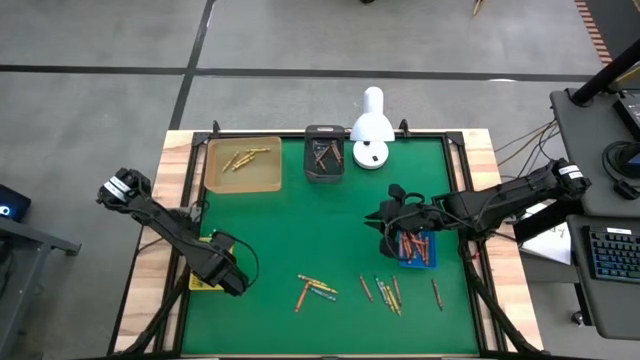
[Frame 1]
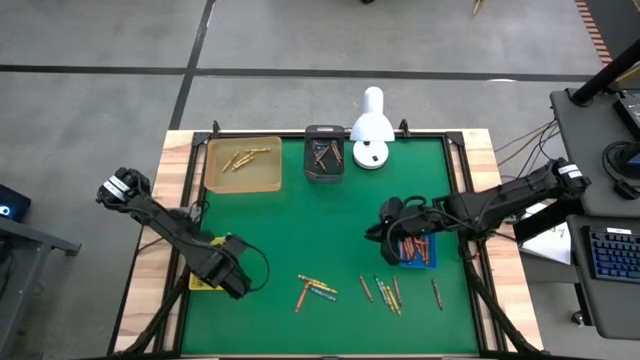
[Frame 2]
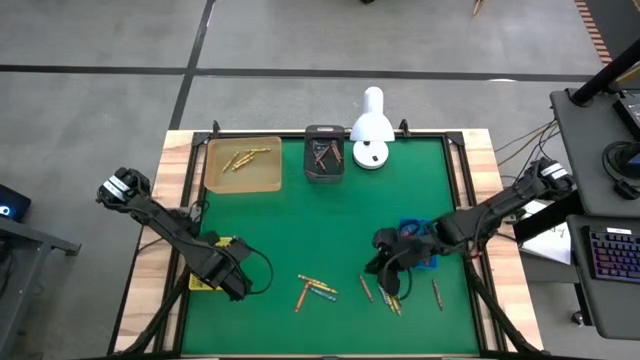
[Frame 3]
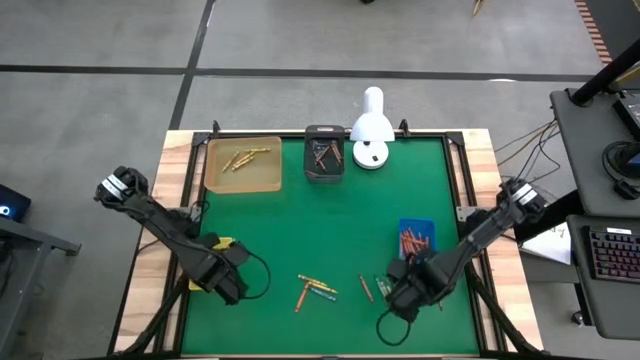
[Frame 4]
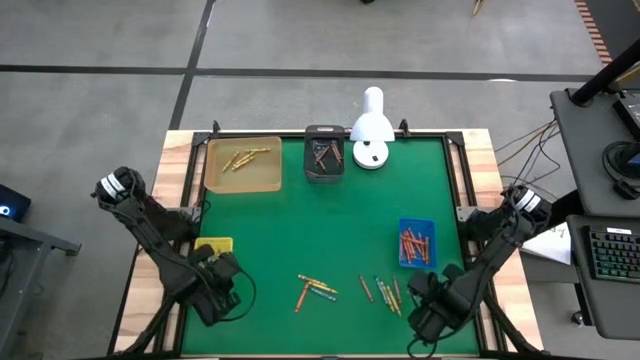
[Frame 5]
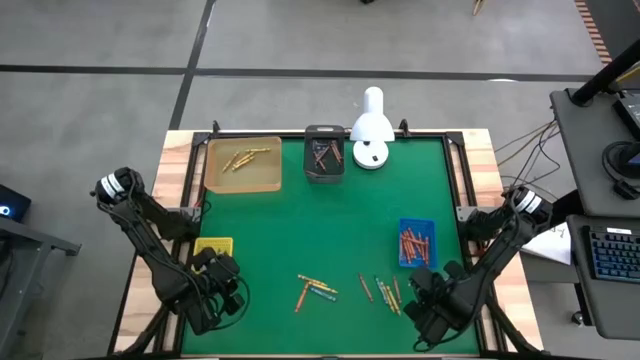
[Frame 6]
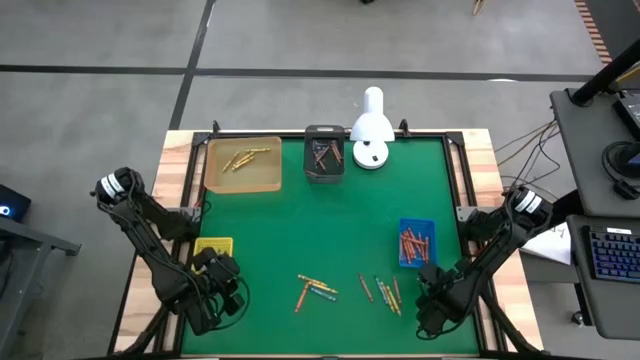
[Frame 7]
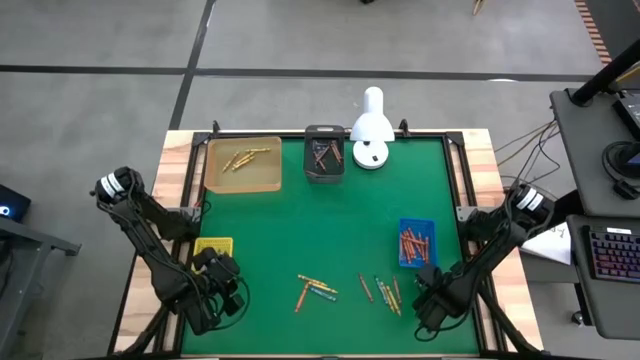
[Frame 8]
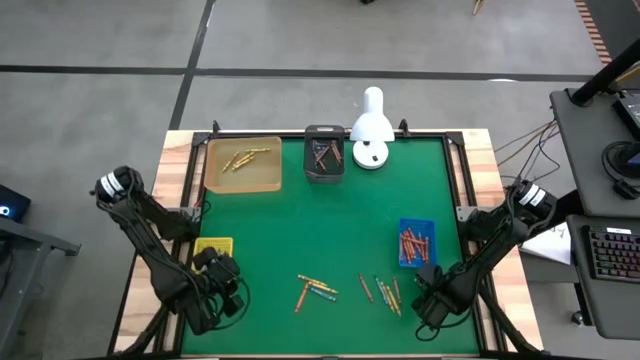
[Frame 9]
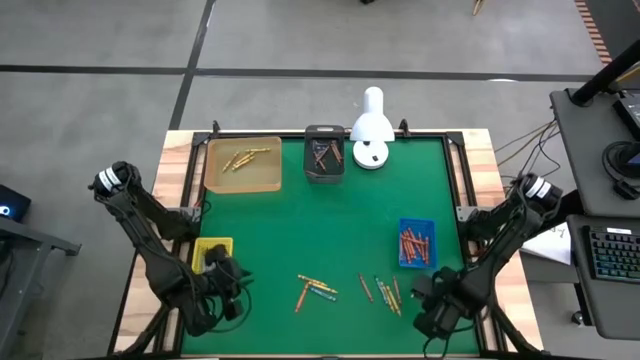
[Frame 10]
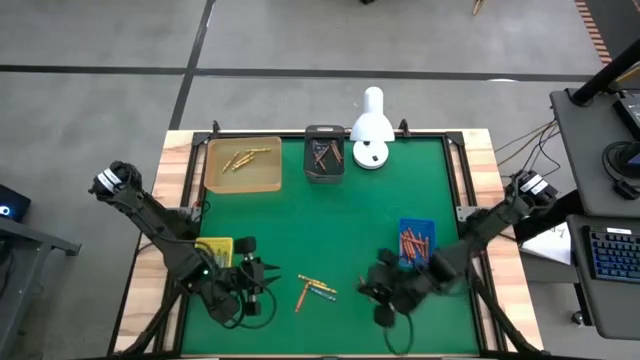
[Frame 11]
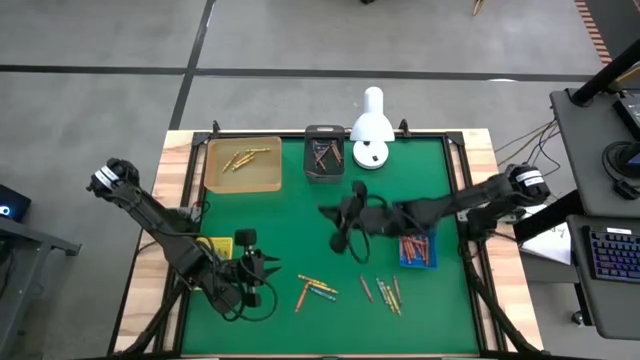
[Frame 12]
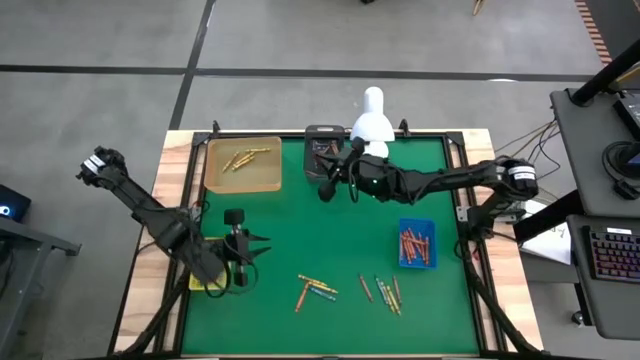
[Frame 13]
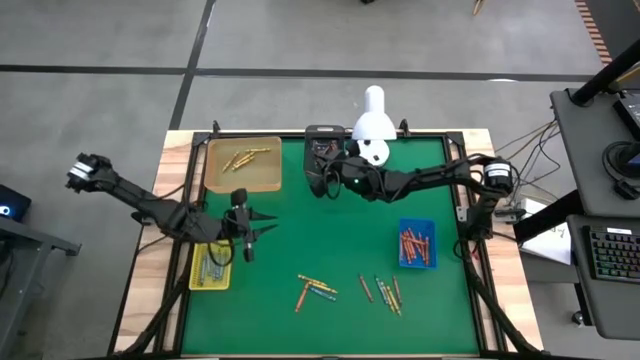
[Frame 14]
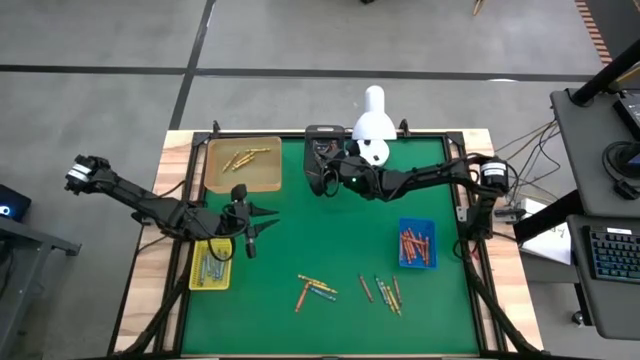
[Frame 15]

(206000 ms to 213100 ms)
Task: Sort crayons
Put the brown crayon into the black bin

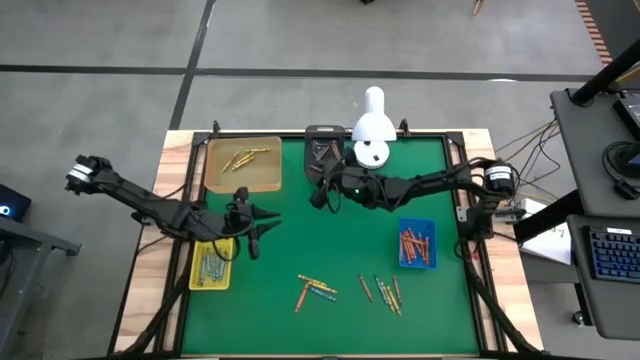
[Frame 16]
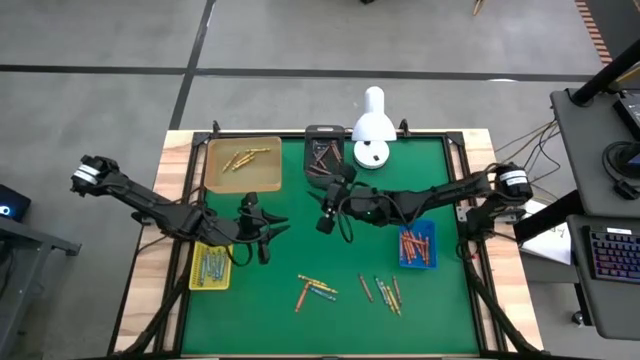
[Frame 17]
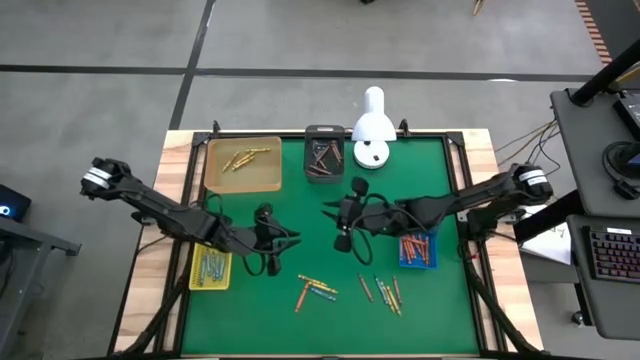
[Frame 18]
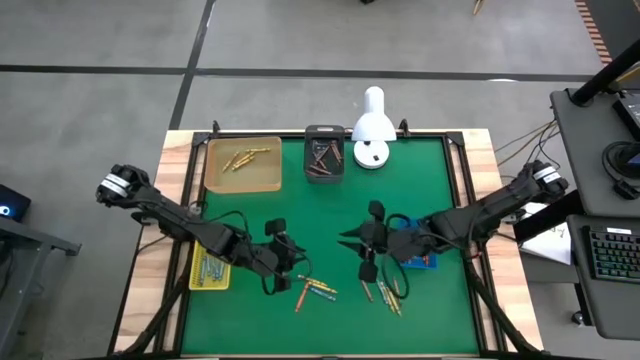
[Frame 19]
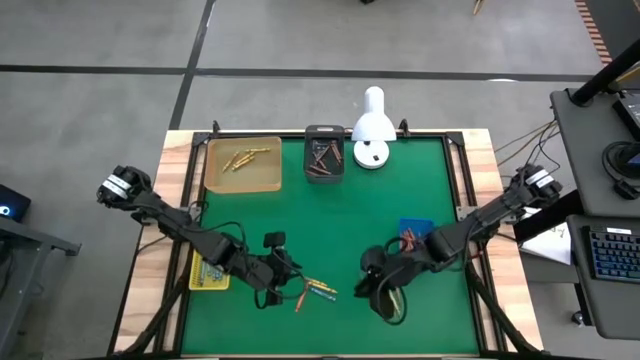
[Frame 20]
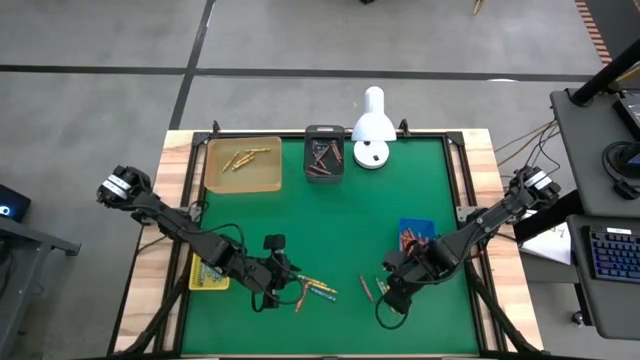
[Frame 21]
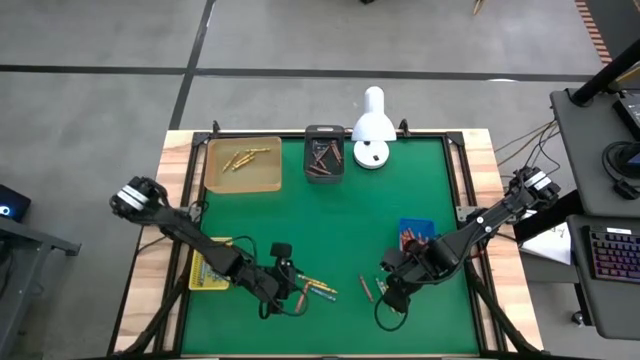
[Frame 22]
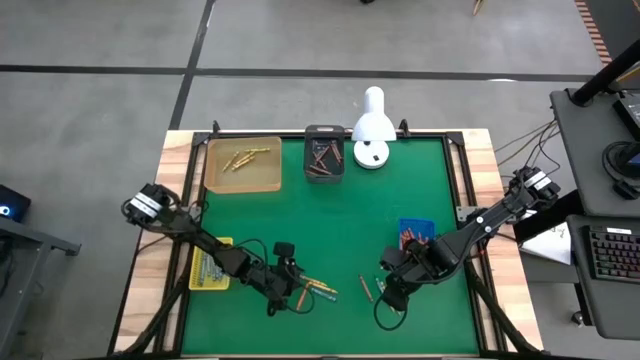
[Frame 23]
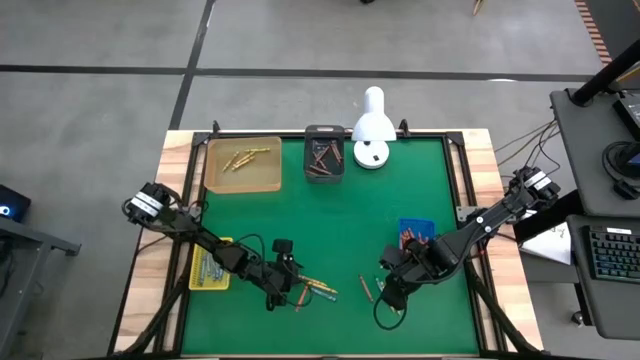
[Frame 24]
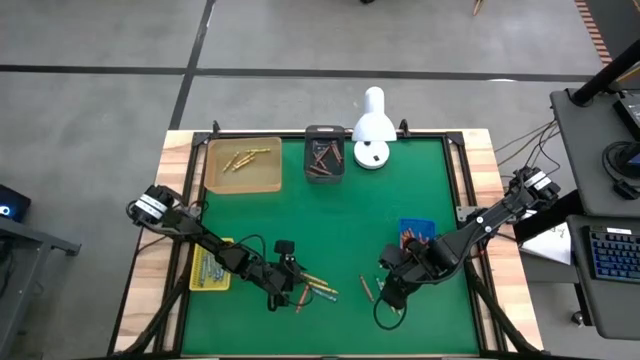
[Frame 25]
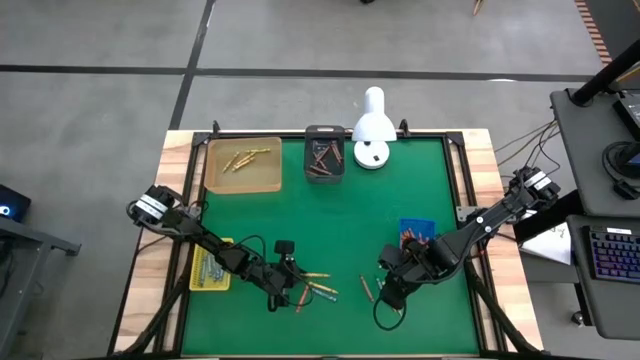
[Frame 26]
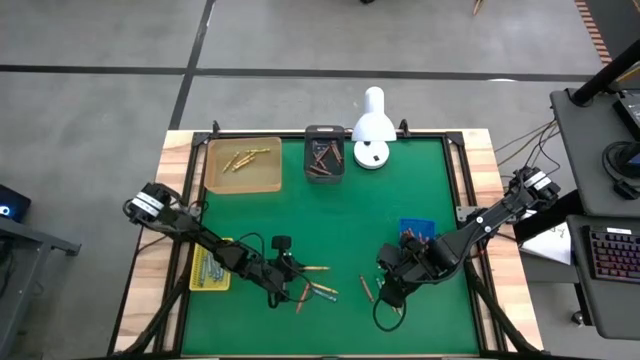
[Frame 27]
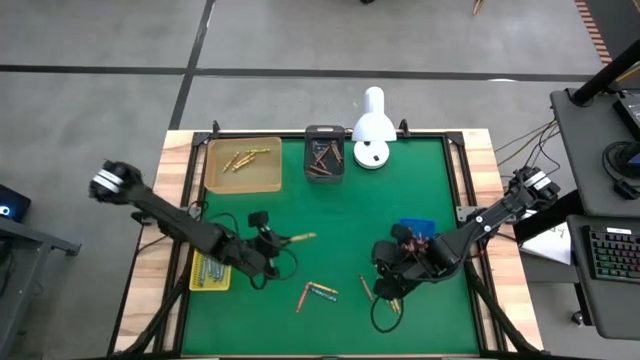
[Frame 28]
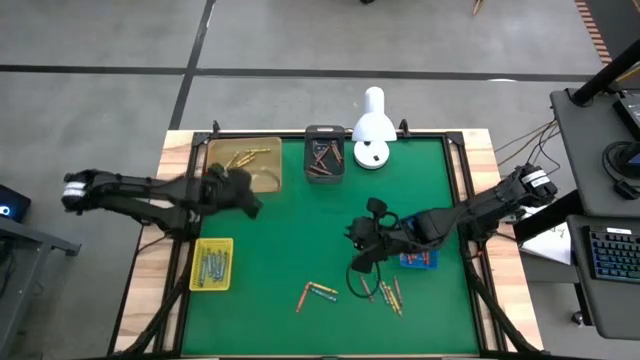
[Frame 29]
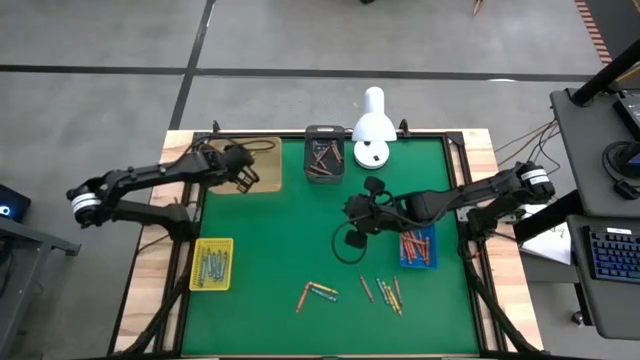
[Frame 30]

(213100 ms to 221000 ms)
Put the green crayon into the orange bin

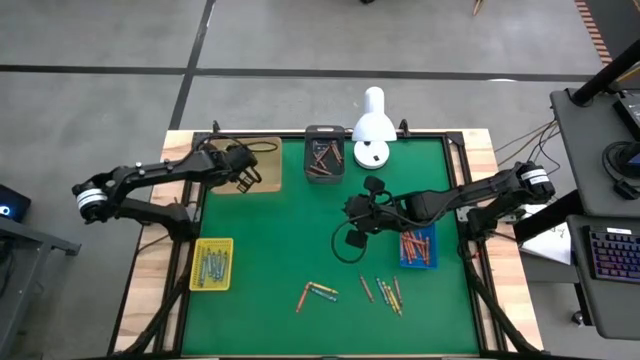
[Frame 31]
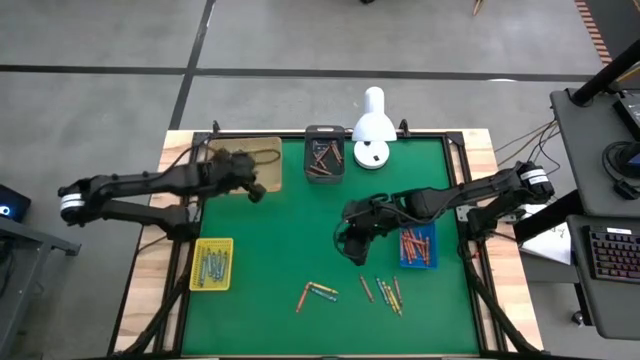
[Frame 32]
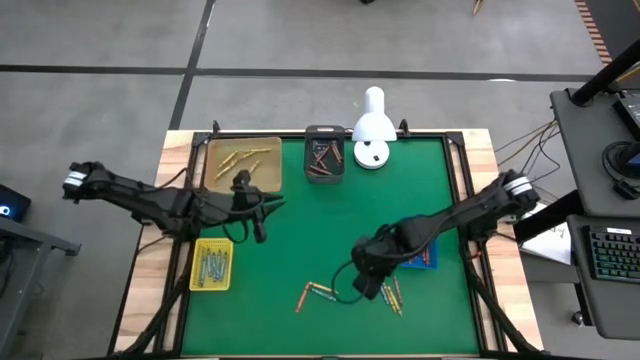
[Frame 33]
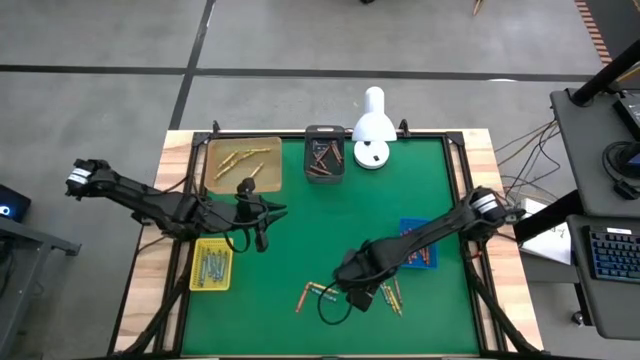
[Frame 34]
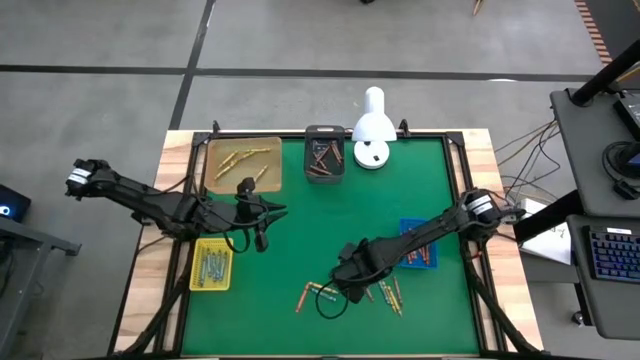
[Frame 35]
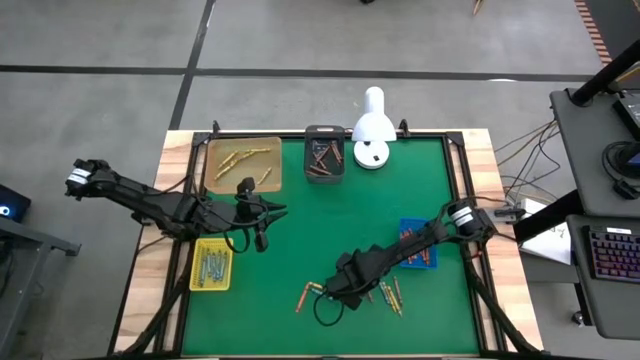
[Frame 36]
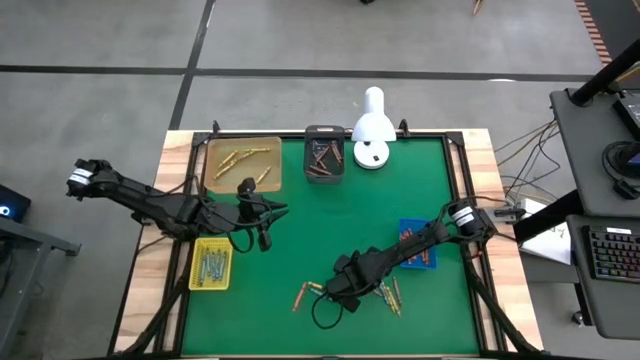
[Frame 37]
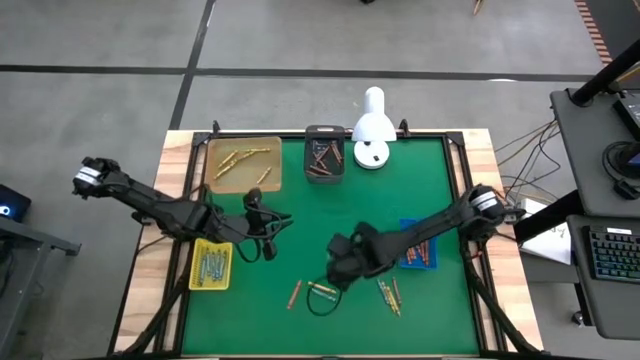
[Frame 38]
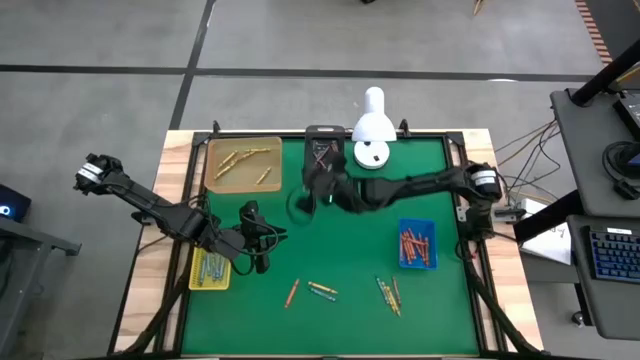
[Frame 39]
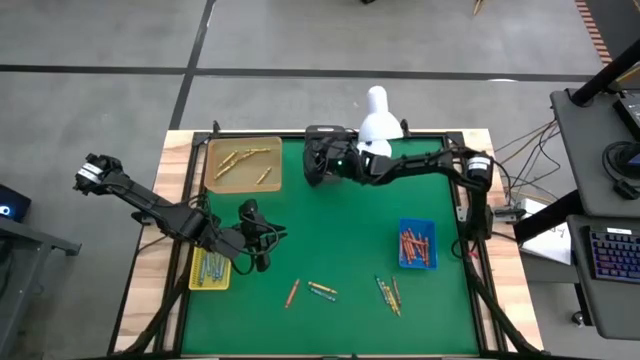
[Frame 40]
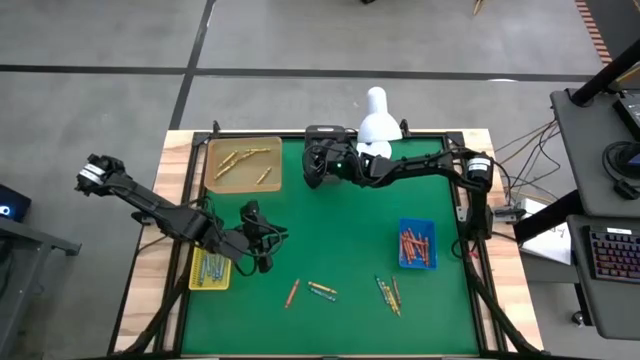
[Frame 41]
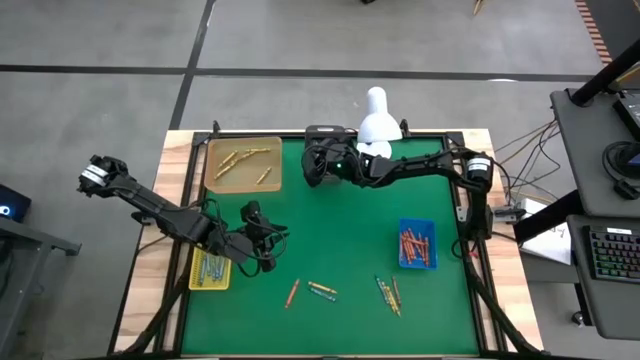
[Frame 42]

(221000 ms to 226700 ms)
Put the brown crayon into the black bin
